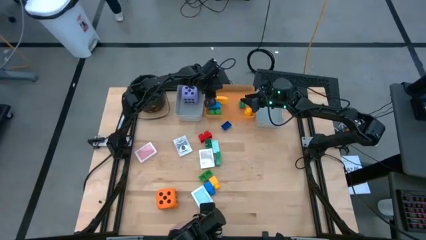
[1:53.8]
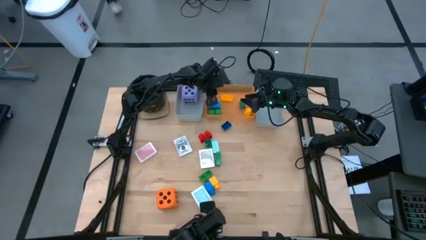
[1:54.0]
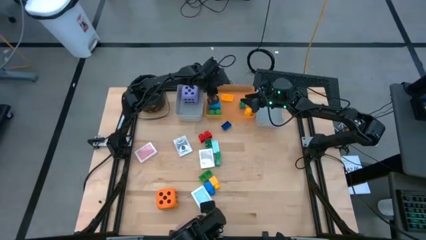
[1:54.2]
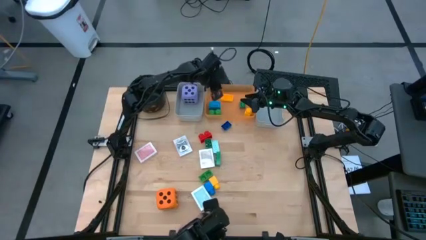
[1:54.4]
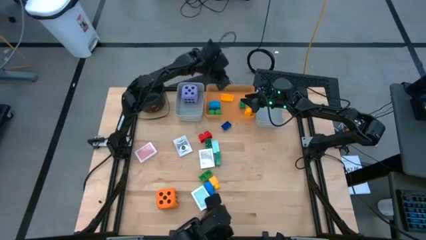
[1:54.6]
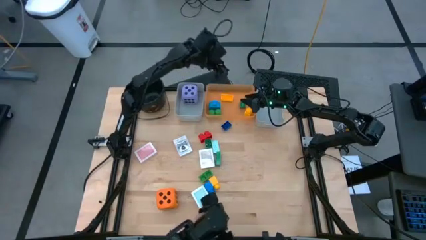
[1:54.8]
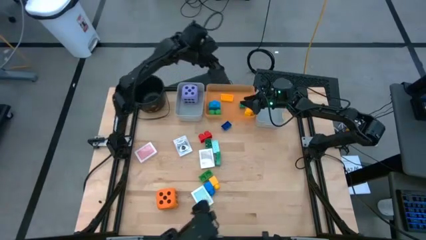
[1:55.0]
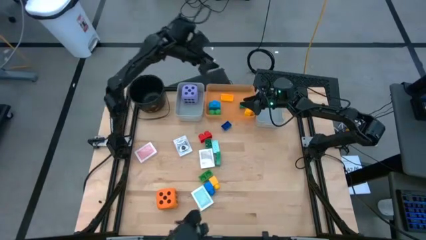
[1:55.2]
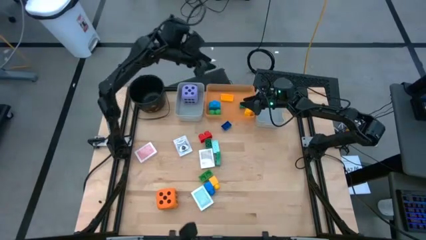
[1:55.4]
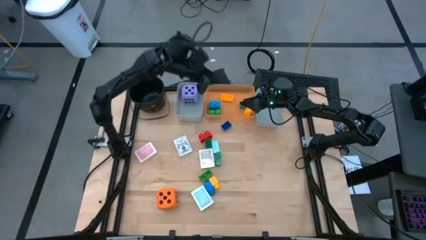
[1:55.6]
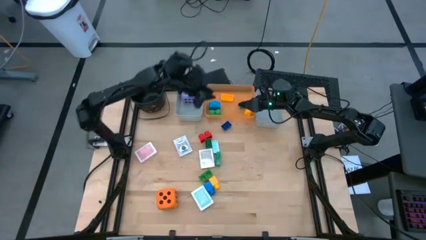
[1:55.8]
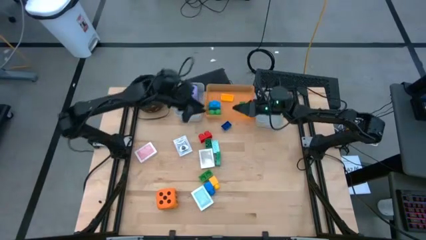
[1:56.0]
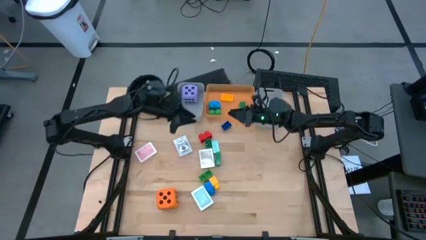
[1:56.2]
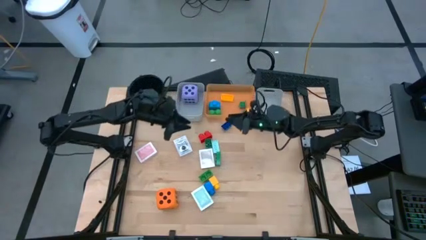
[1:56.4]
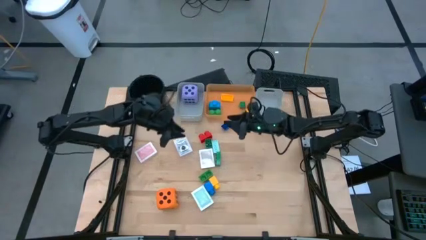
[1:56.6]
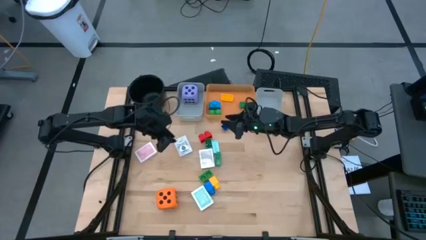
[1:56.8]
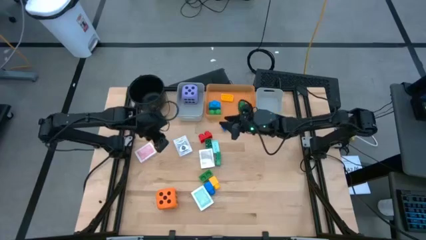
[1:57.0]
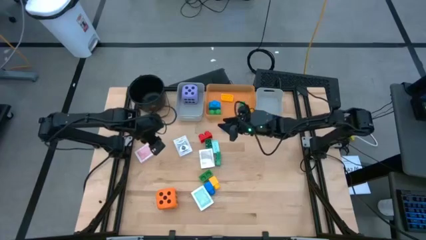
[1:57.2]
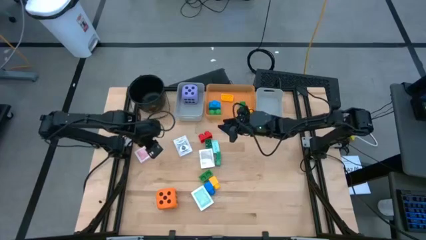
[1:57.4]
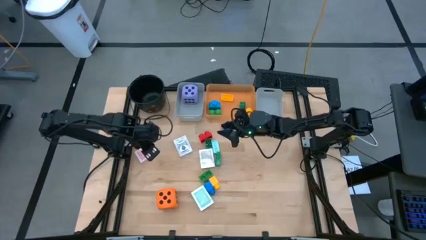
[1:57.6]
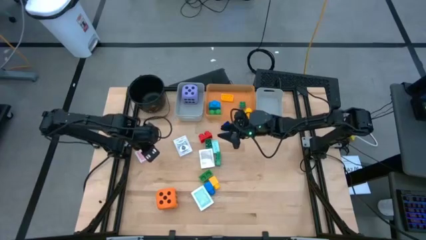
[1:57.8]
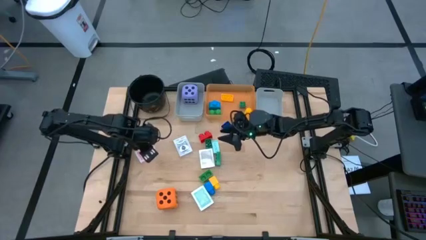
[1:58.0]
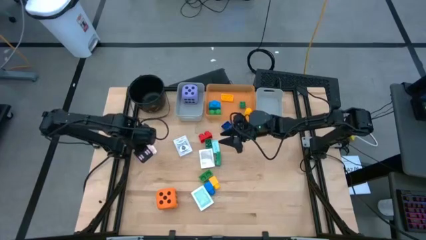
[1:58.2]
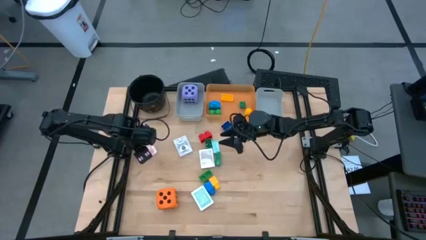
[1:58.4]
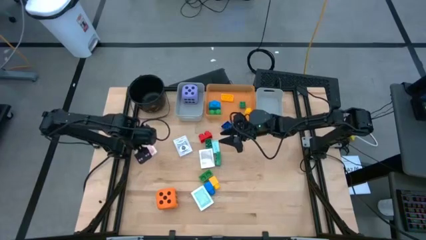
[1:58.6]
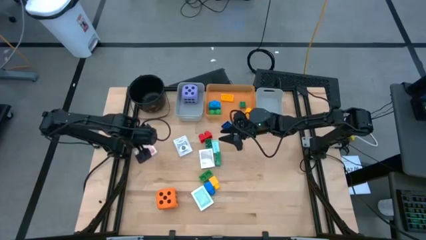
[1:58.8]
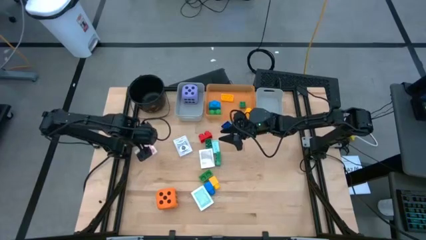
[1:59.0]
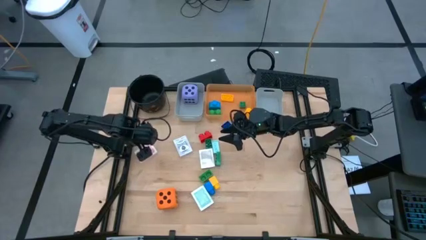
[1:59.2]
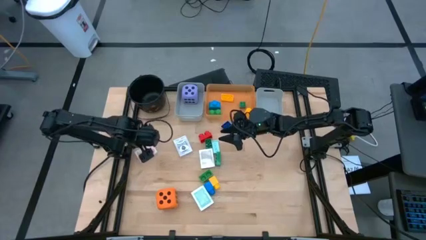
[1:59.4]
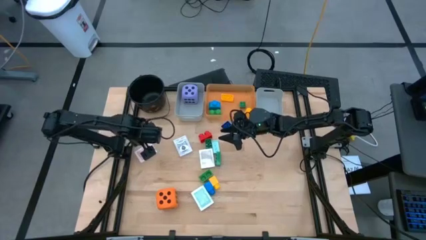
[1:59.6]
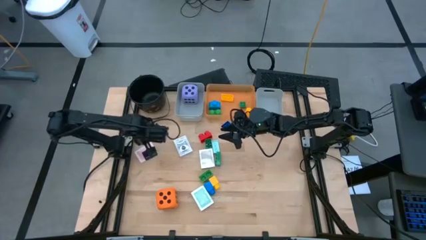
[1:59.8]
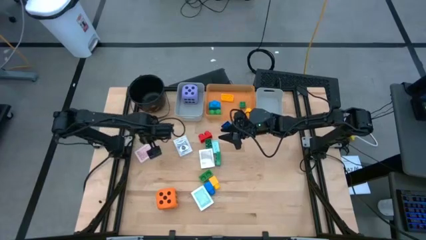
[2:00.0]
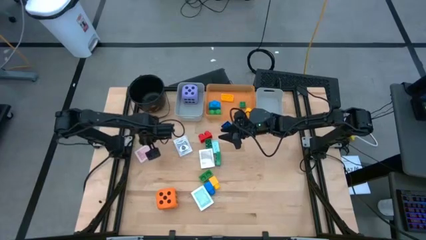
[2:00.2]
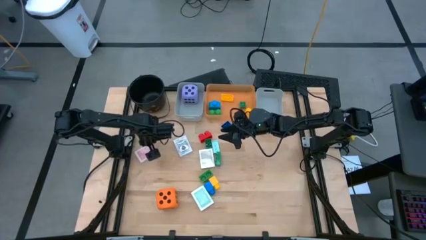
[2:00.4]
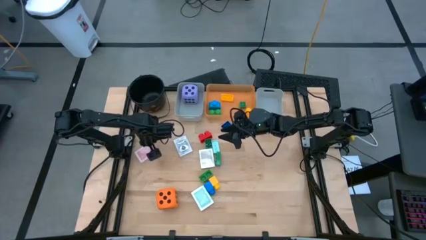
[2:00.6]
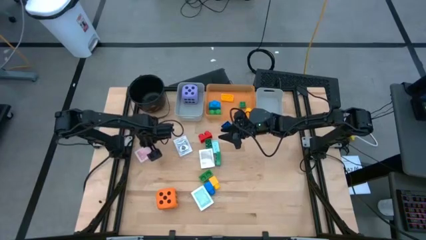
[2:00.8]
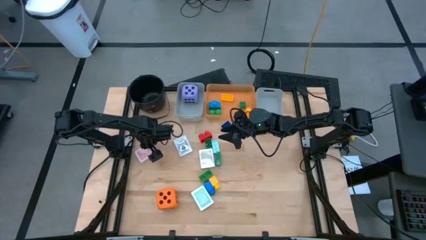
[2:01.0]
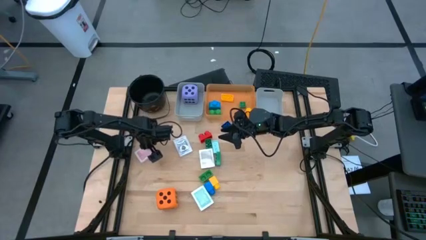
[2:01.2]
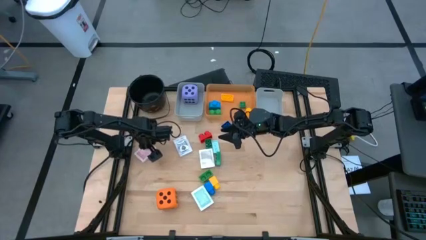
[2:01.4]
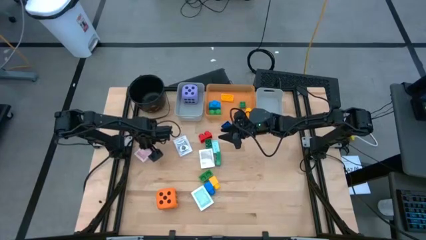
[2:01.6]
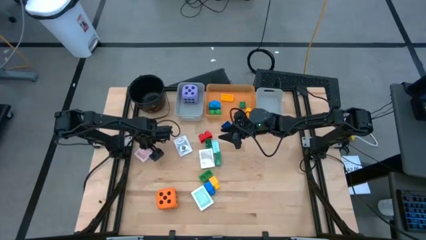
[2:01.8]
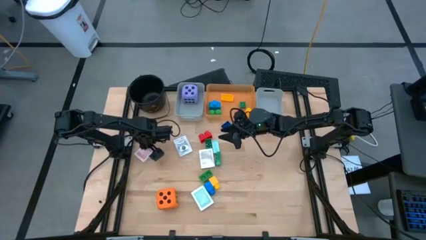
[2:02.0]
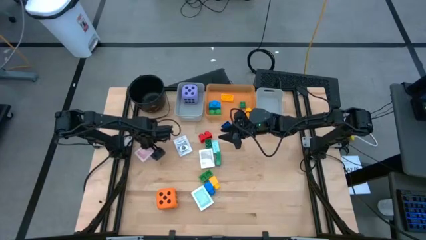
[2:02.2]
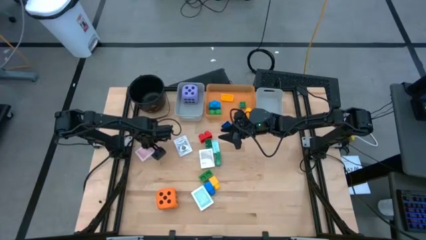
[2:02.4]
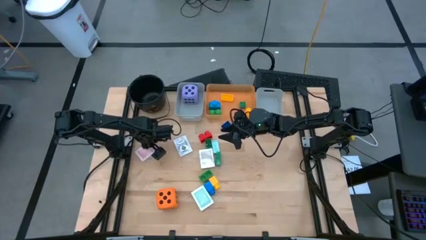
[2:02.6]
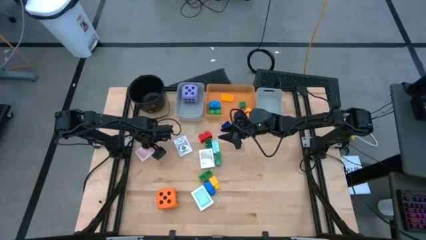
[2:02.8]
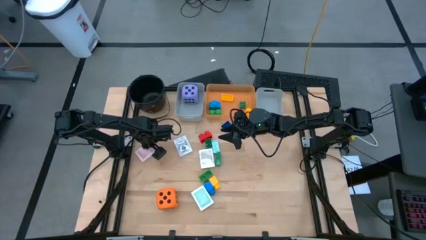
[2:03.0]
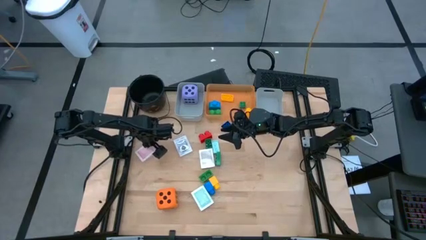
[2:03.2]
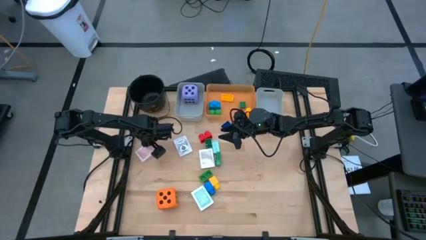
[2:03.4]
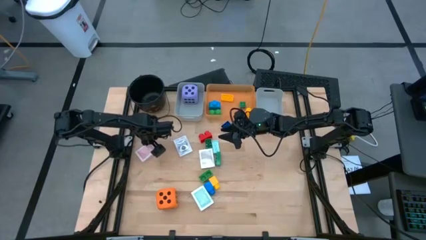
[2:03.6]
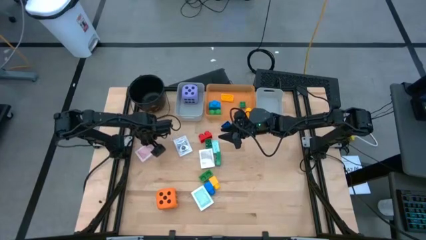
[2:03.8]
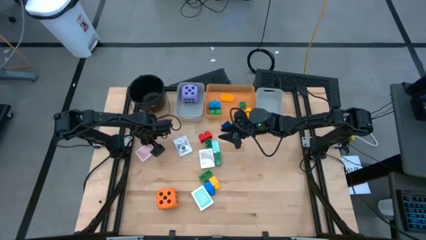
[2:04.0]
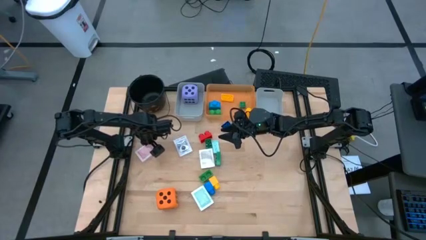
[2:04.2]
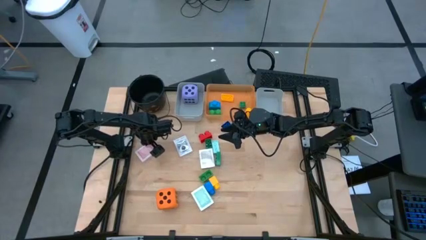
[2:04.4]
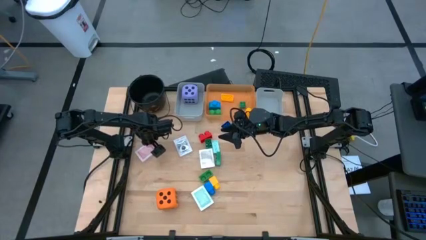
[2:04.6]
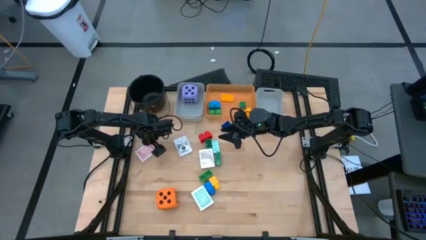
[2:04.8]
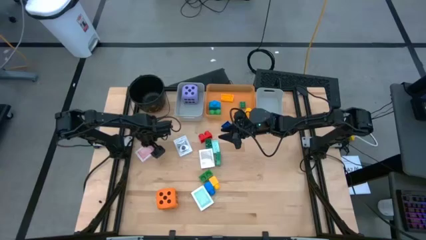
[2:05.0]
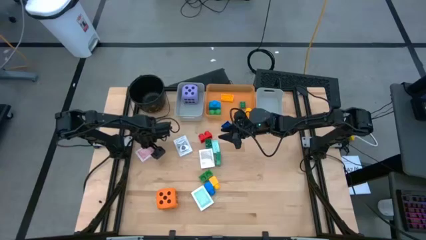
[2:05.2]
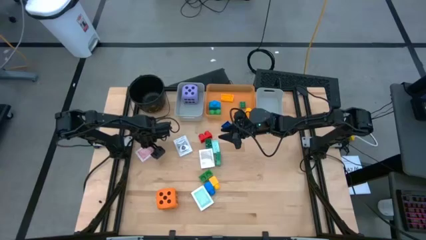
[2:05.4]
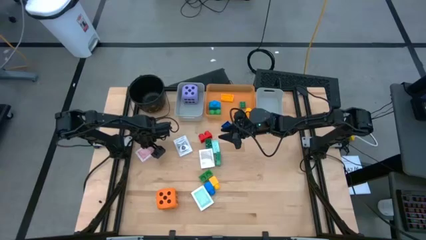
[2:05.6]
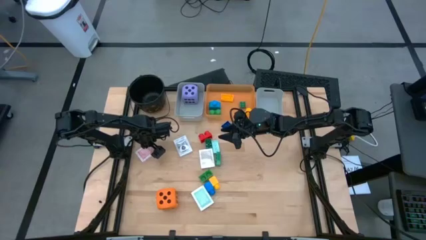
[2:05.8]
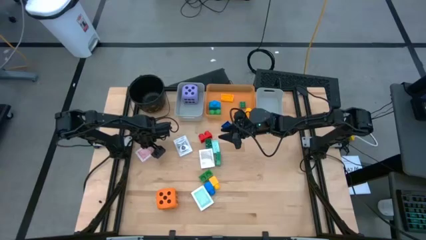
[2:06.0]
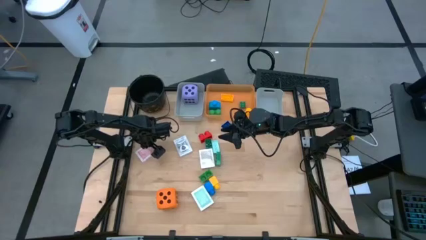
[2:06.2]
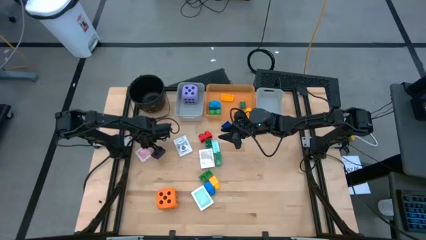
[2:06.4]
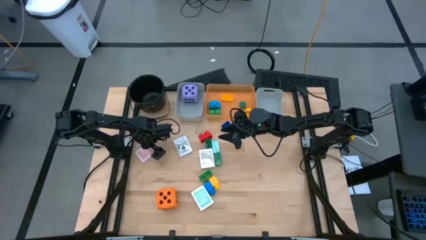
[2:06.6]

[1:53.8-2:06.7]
Task: Pick & Place Toys
Put the red deck of cards into the right gray bin

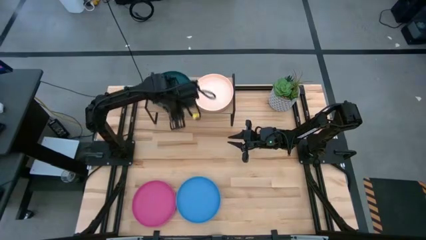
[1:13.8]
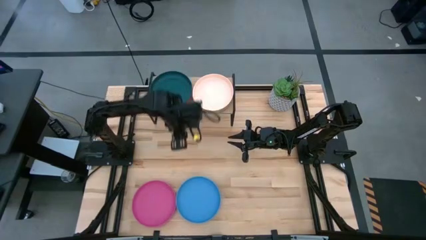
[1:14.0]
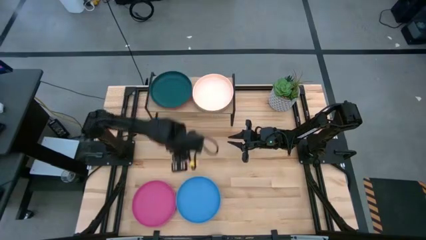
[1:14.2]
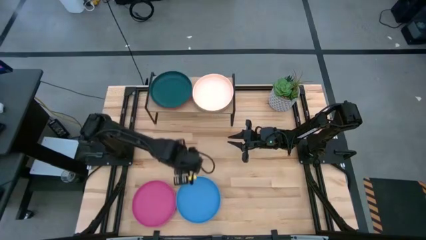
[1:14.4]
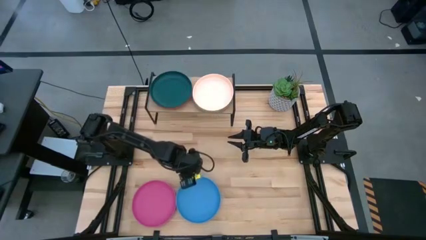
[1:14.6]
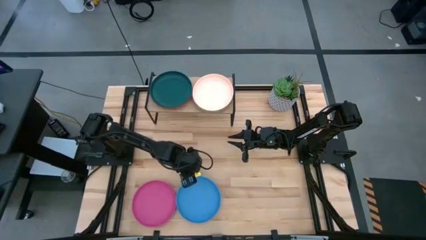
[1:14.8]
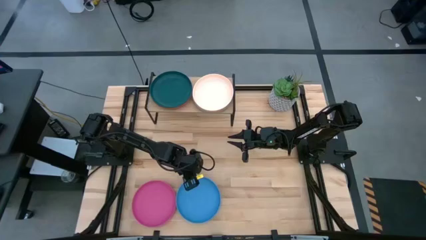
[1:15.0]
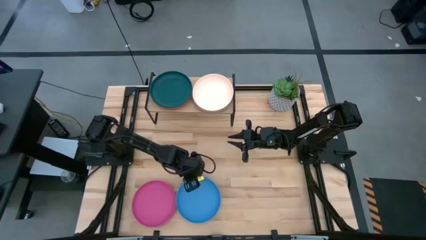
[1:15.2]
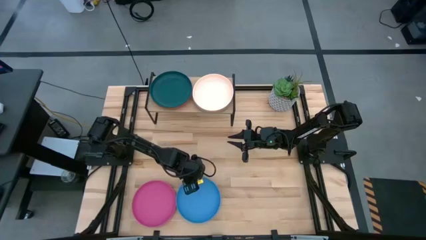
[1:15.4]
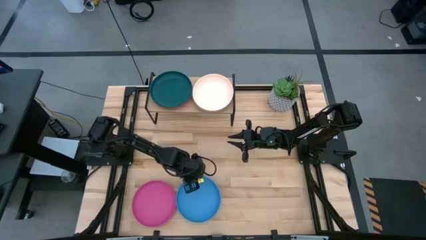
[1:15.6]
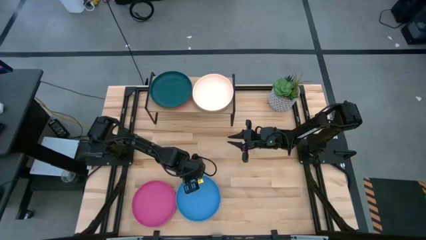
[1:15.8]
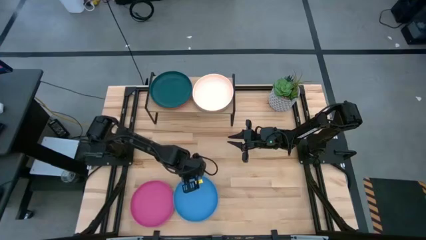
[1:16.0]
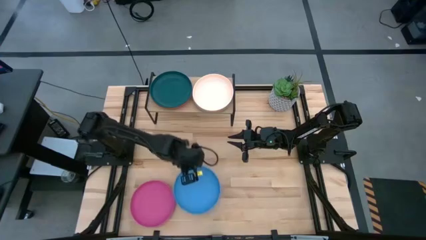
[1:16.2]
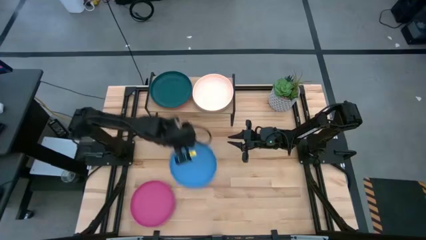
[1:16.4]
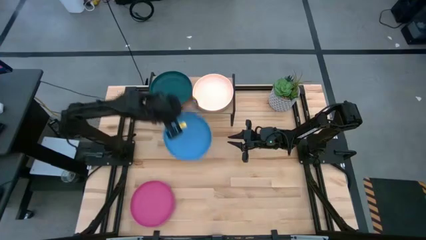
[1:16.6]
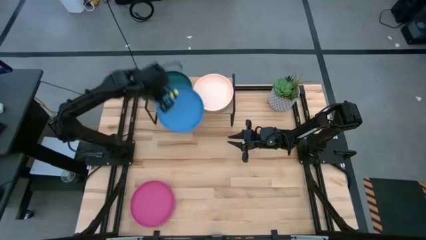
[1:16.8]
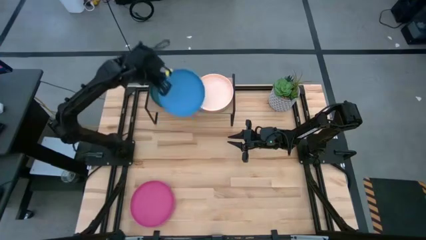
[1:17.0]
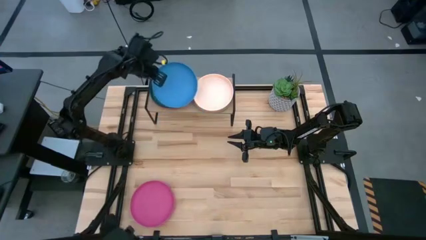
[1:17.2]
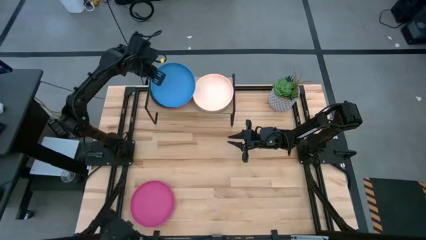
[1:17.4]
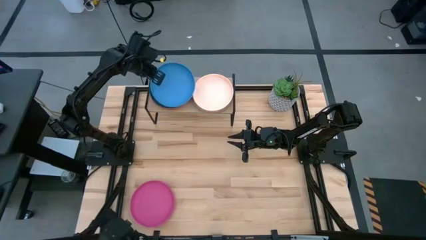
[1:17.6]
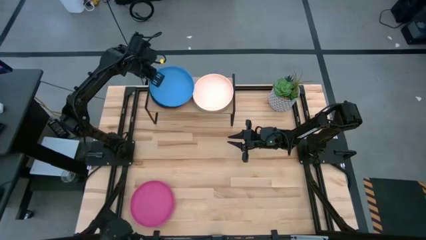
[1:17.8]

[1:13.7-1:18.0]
Task: Place and stack plates onto a shelf
Stack the blue plate on top of the dark blue plate on the shelf
